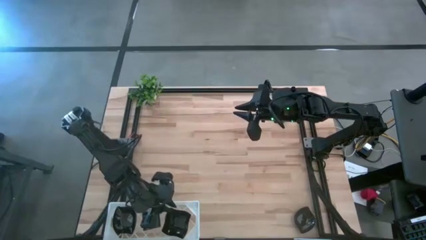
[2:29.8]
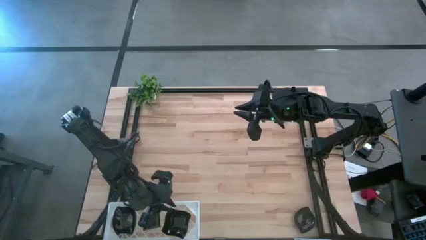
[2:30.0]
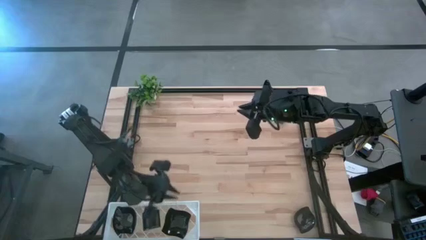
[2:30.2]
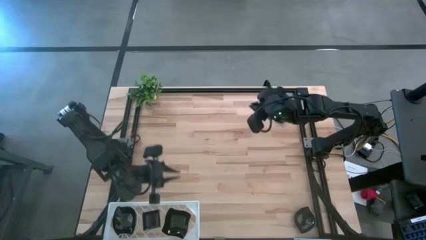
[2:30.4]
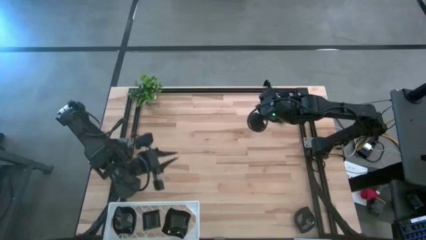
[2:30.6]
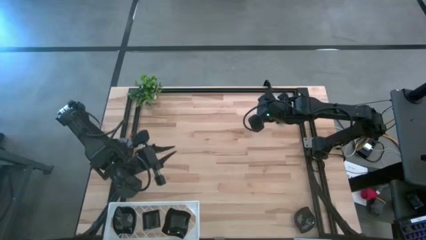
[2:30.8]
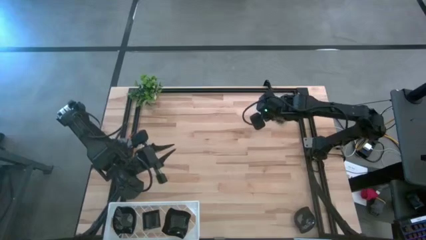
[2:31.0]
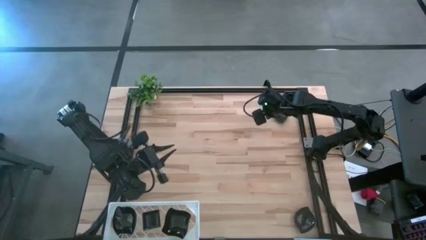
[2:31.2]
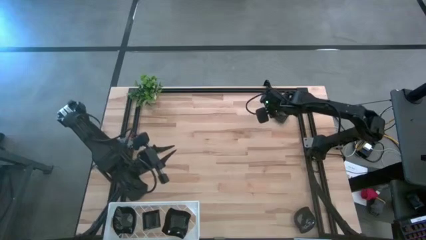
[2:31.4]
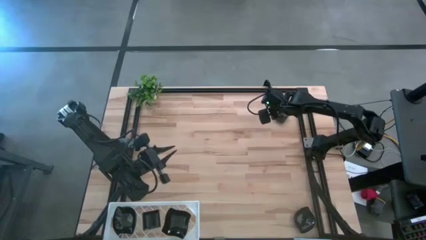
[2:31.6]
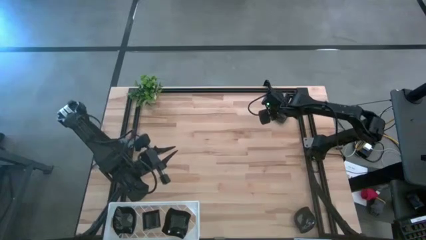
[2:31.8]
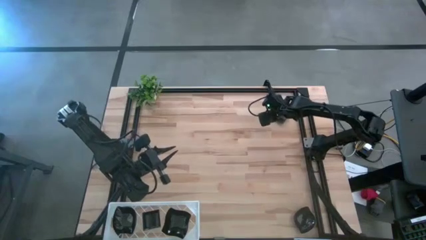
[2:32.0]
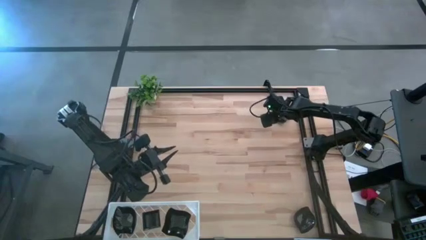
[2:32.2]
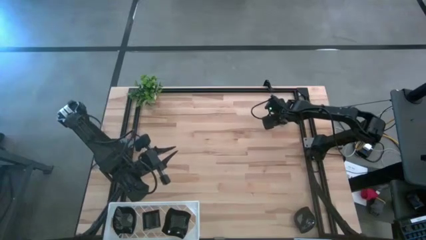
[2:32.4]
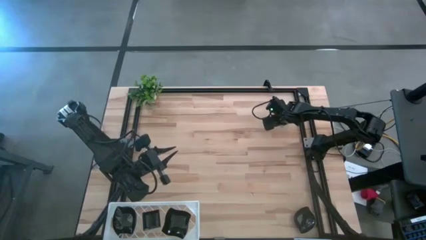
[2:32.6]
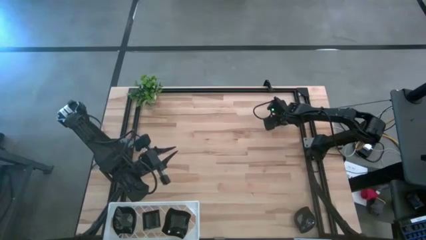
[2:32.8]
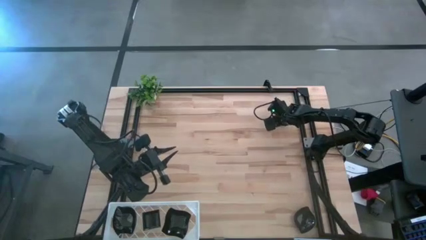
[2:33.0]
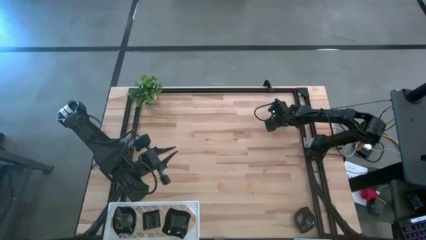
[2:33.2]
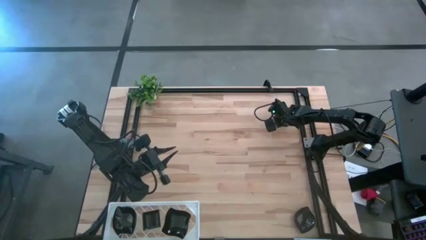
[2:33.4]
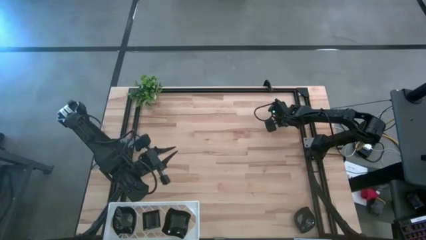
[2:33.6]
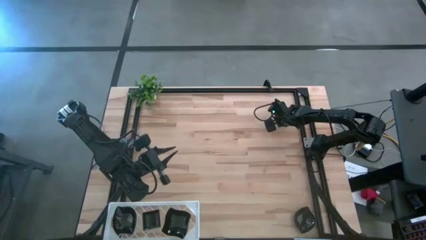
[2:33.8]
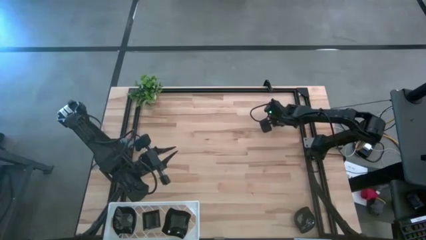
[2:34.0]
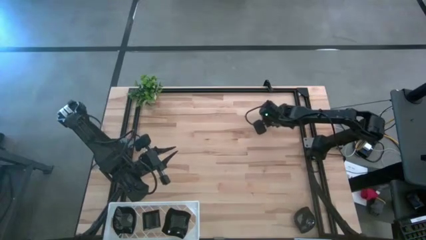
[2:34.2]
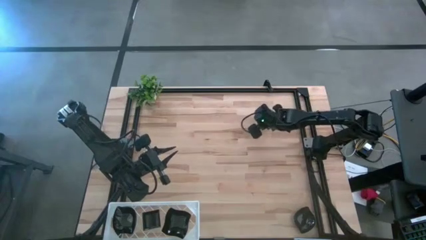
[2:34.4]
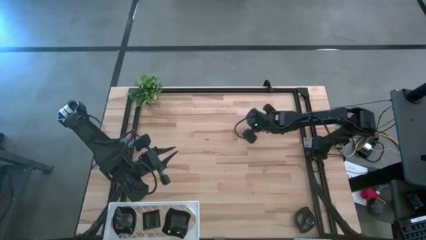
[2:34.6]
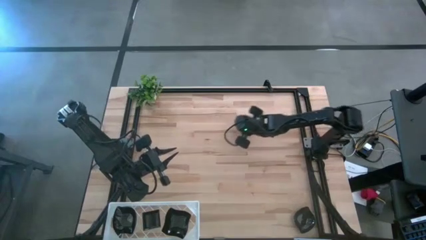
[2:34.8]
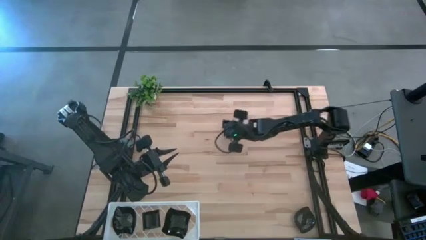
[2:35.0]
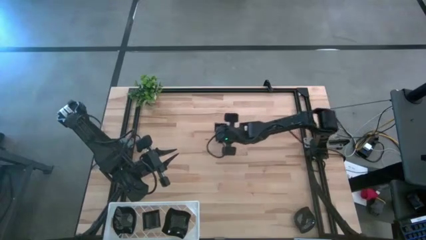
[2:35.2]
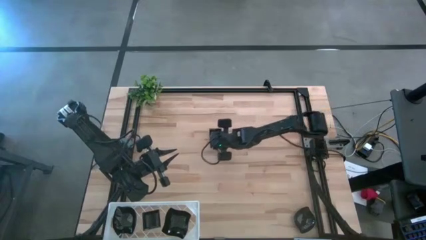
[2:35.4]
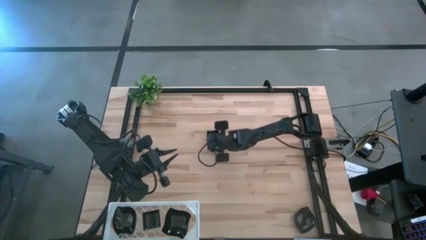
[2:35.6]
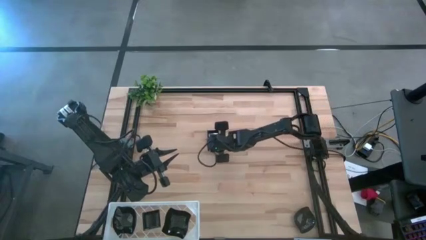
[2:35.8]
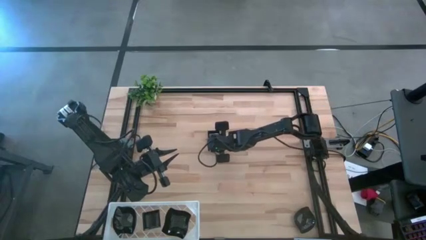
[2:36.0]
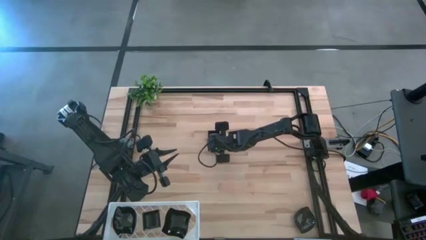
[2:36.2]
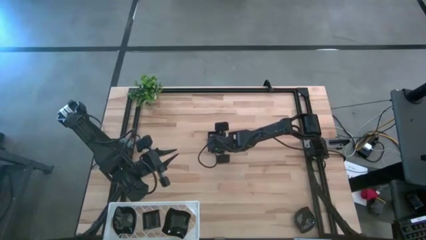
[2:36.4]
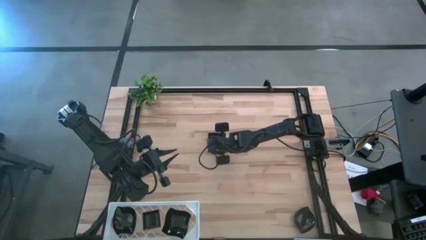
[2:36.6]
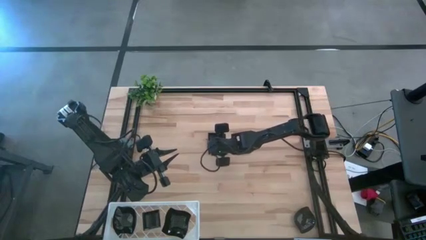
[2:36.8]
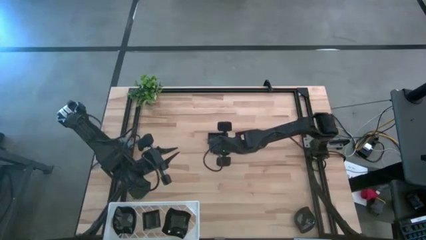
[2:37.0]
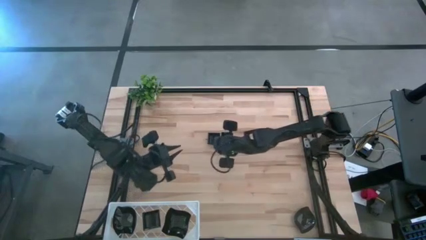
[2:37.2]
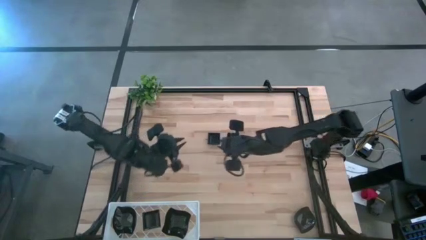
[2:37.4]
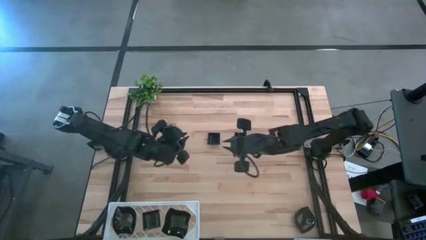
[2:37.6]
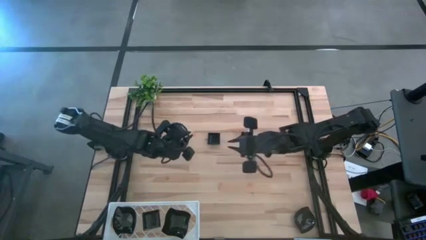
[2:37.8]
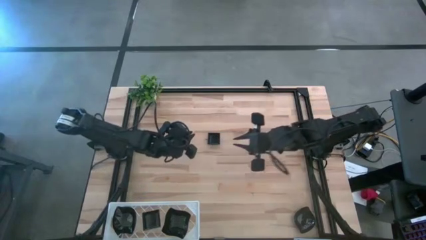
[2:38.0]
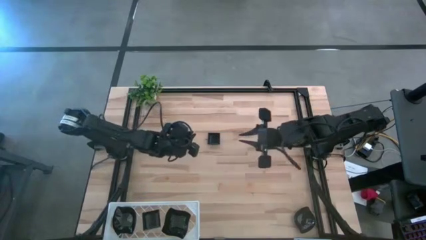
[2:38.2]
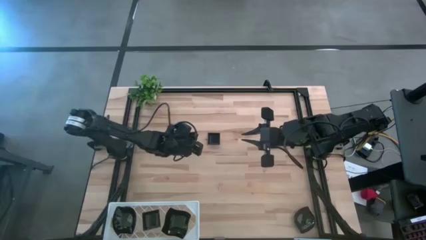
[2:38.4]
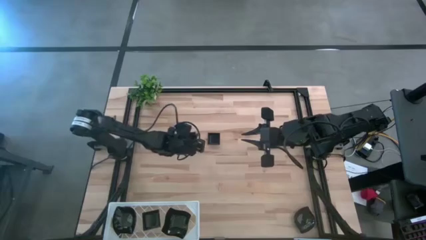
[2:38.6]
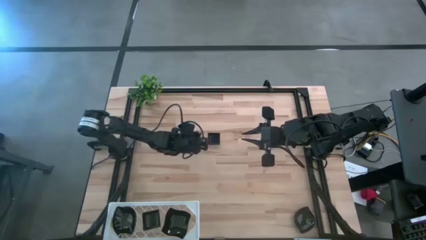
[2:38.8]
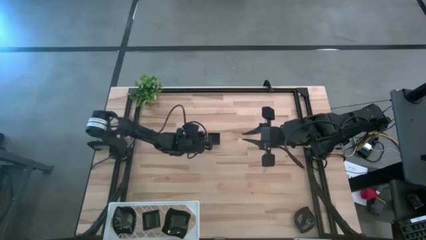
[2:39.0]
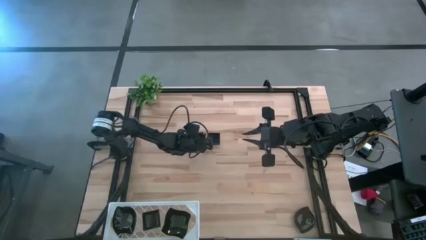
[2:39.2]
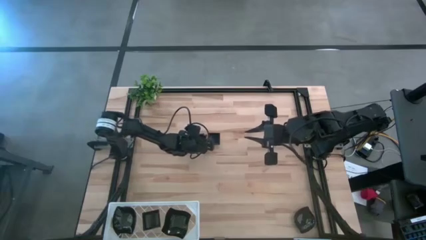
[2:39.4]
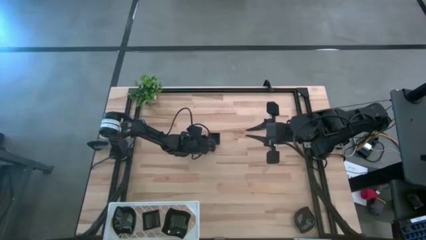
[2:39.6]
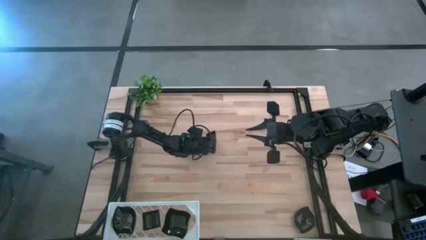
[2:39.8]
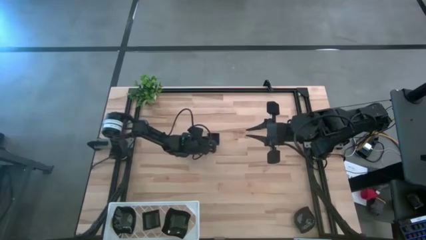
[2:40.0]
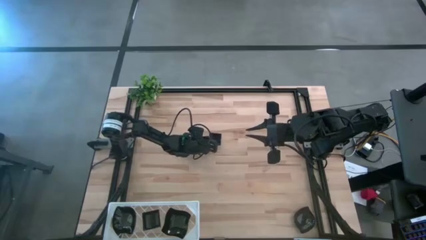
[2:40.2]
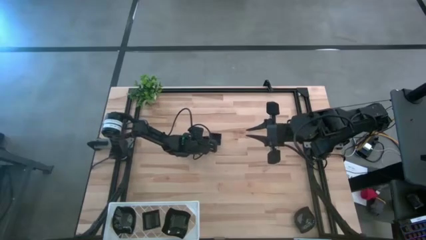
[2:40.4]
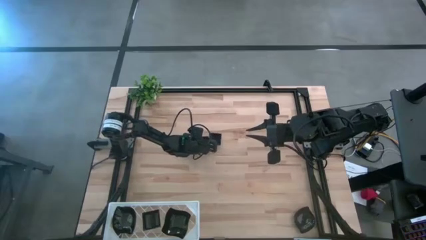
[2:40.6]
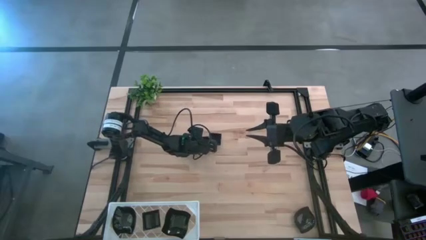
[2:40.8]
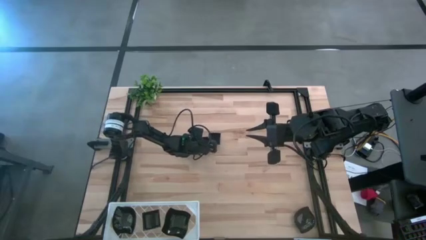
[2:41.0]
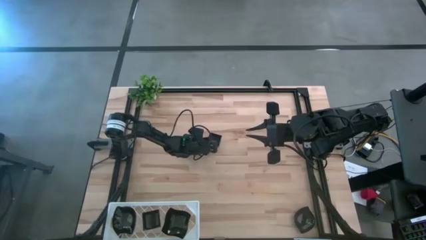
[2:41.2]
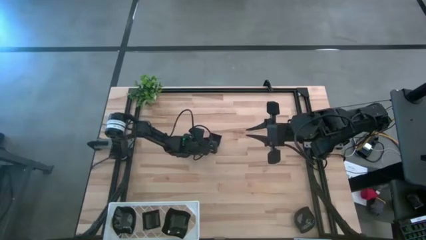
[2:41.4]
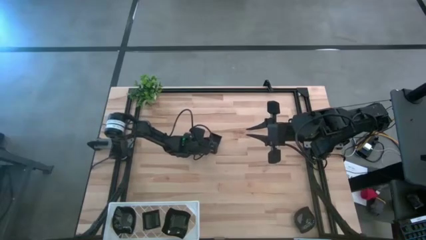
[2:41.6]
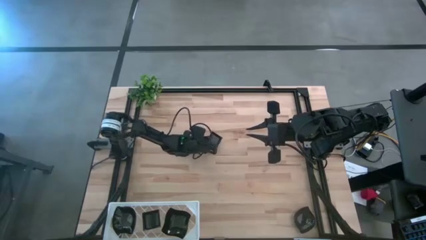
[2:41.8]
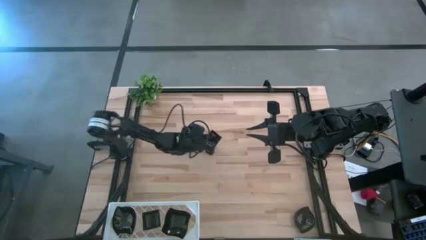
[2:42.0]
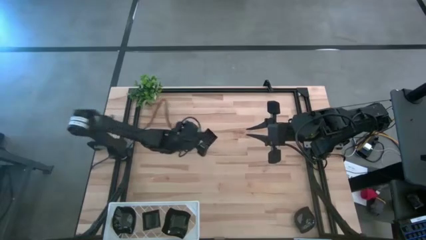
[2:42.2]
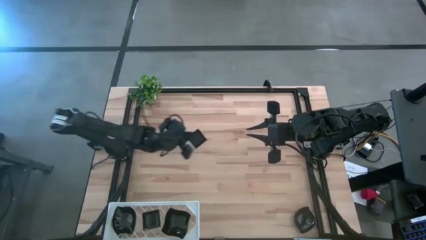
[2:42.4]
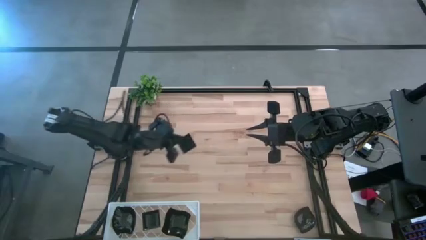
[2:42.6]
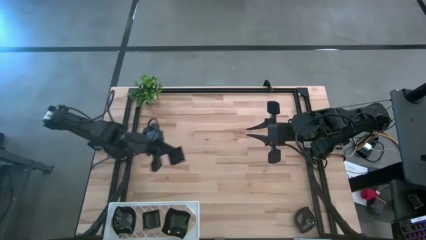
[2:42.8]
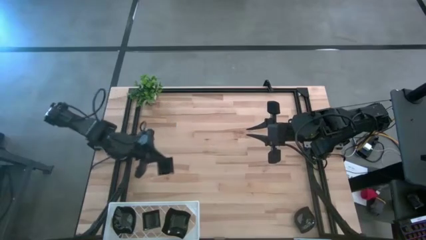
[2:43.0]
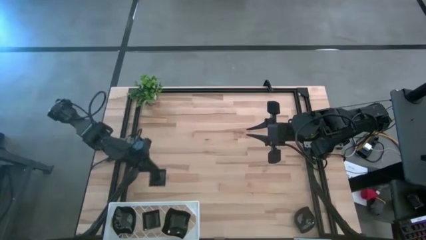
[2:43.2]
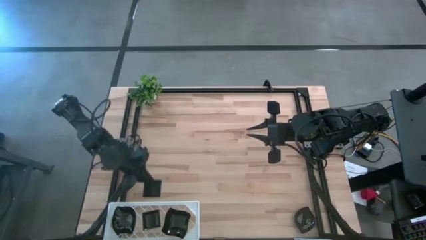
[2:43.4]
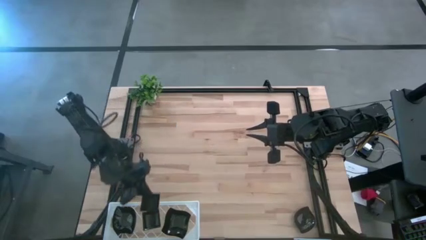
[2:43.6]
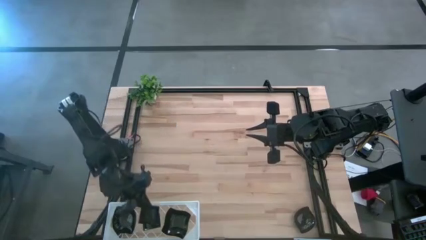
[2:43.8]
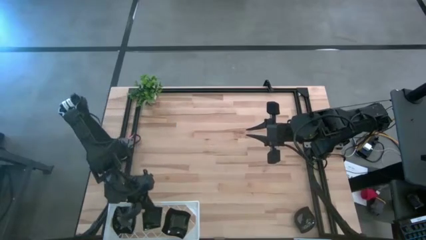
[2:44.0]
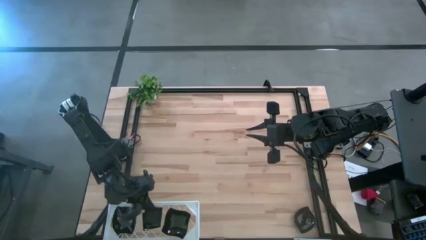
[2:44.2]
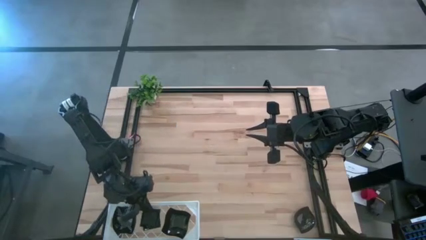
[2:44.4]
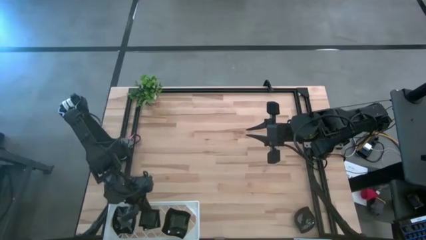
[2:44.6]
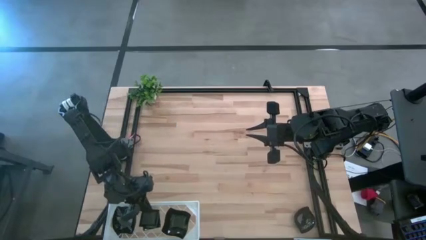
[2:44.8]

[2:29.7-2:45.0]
Task: Pick & Place Mini shaped plates
Stack the black square plate on top of the other black square plates on the shelf
